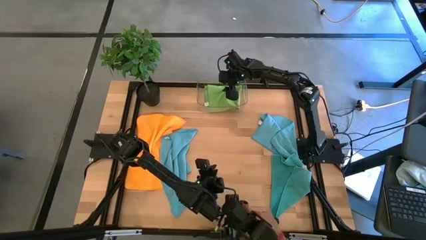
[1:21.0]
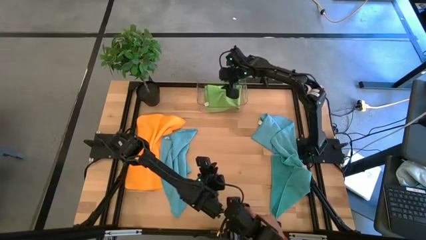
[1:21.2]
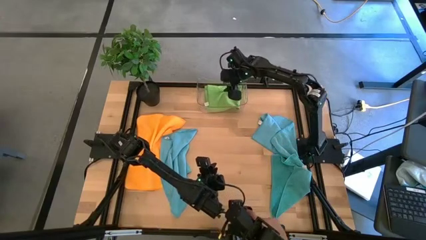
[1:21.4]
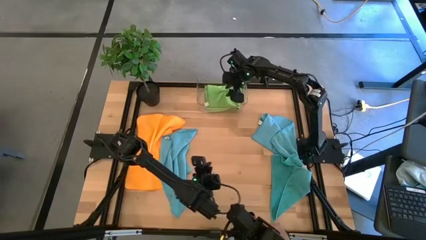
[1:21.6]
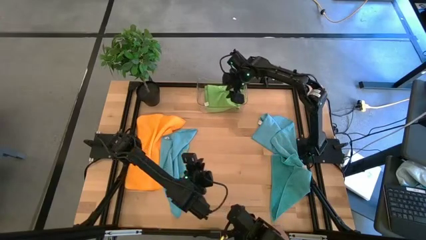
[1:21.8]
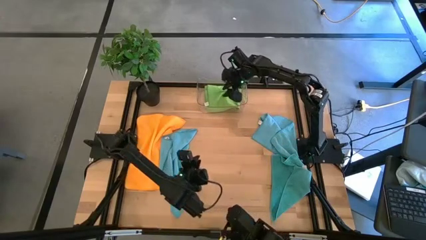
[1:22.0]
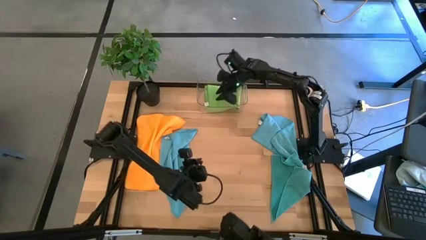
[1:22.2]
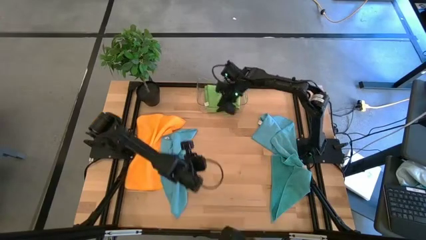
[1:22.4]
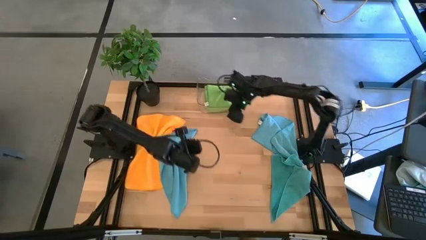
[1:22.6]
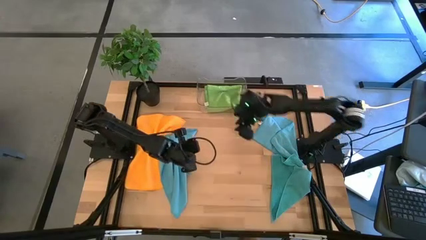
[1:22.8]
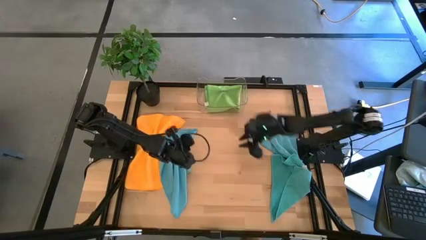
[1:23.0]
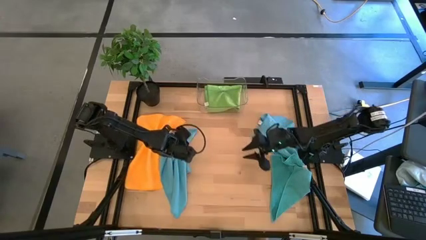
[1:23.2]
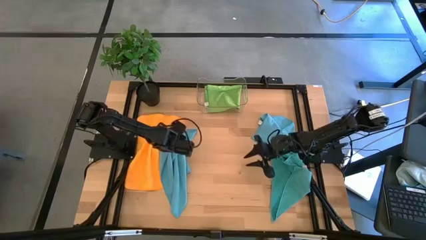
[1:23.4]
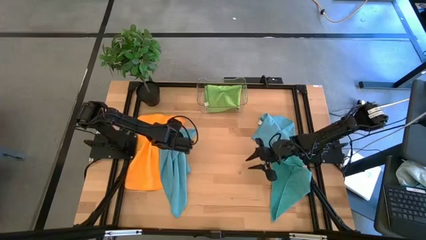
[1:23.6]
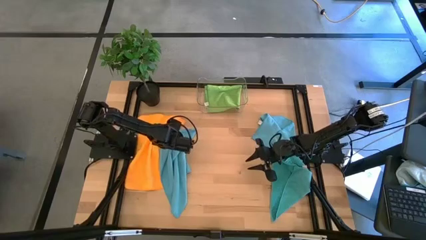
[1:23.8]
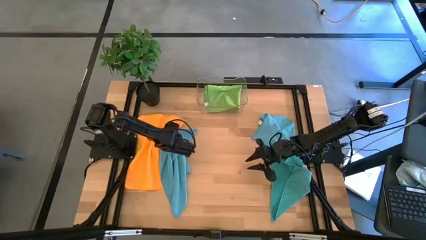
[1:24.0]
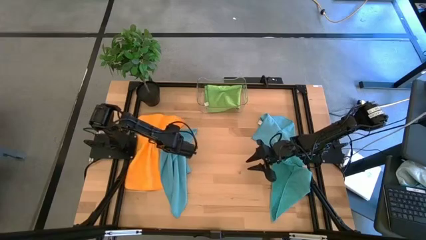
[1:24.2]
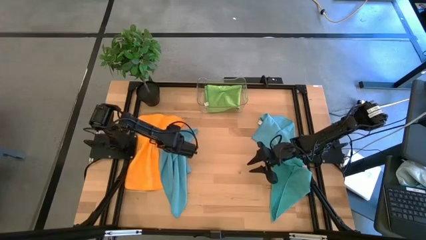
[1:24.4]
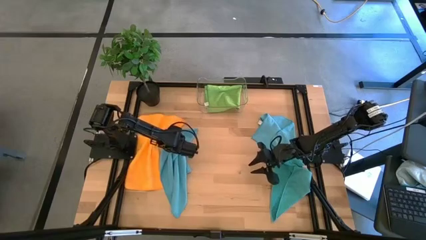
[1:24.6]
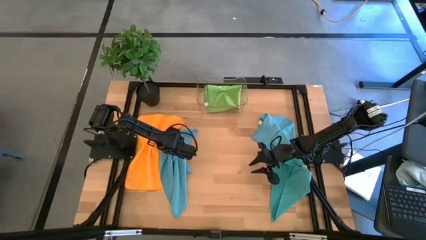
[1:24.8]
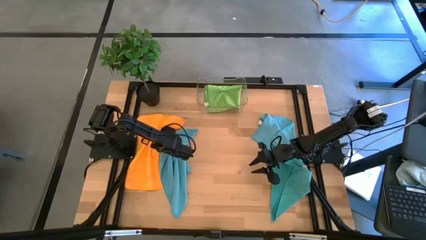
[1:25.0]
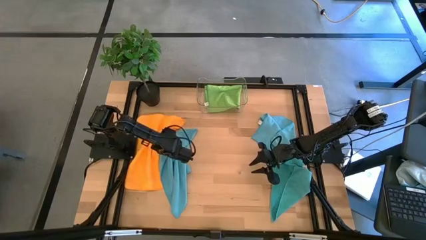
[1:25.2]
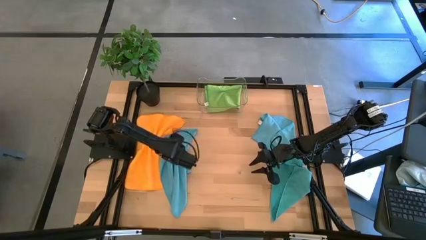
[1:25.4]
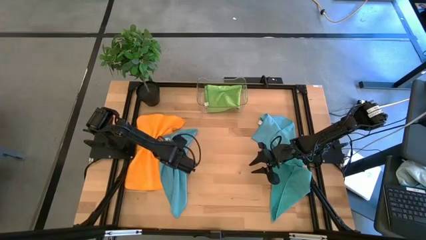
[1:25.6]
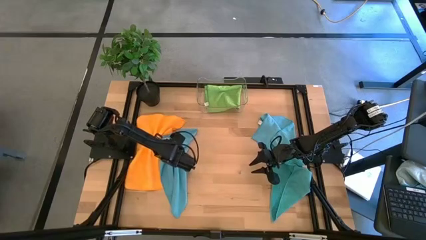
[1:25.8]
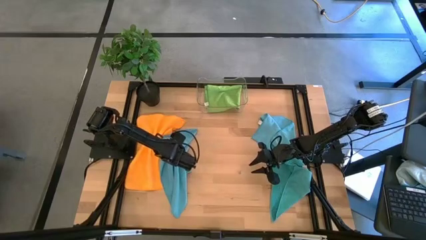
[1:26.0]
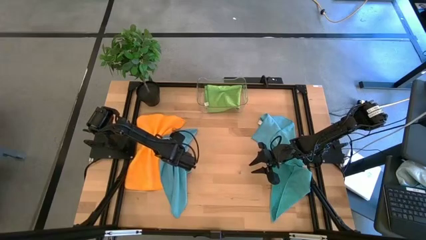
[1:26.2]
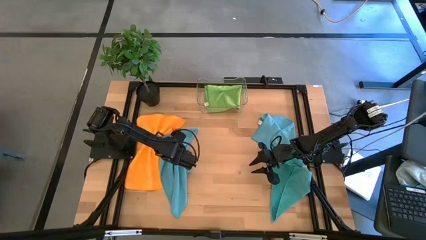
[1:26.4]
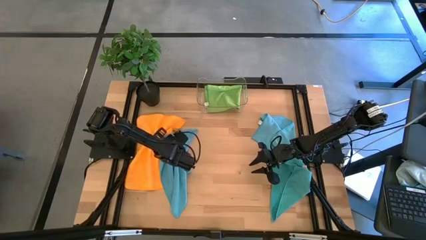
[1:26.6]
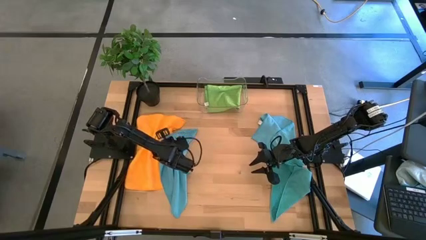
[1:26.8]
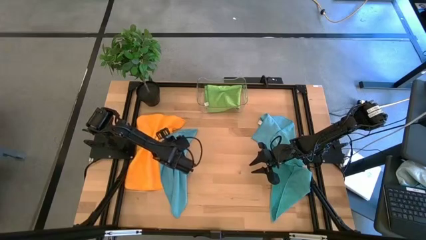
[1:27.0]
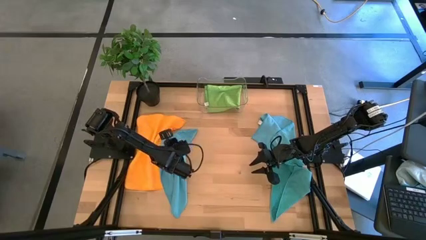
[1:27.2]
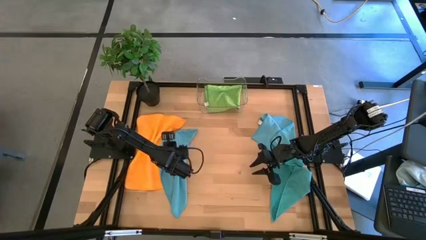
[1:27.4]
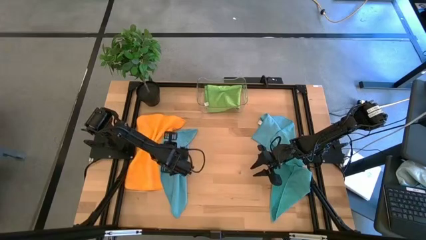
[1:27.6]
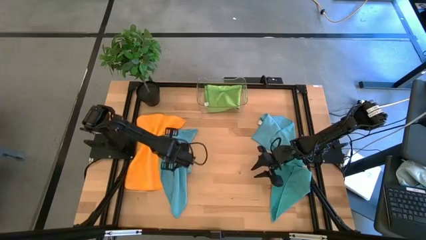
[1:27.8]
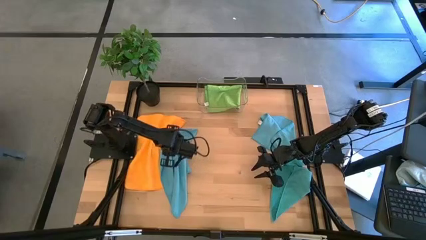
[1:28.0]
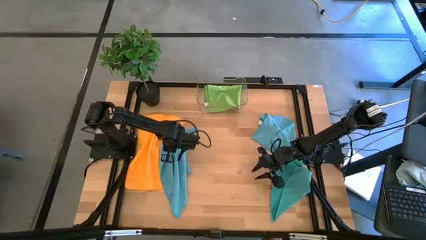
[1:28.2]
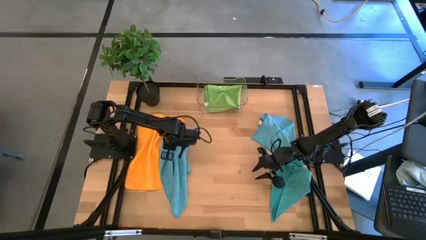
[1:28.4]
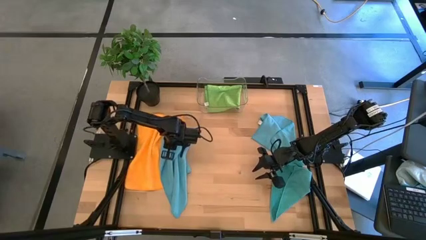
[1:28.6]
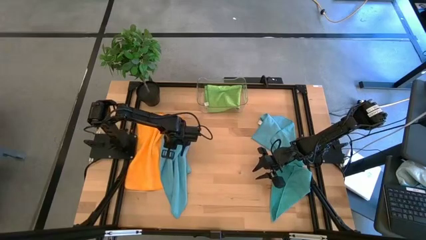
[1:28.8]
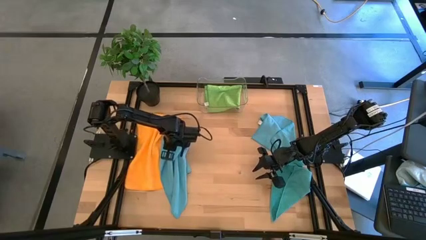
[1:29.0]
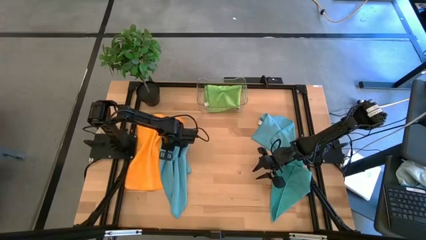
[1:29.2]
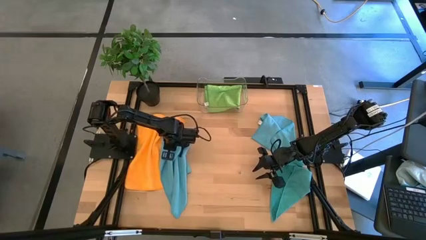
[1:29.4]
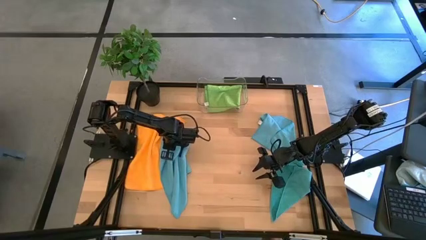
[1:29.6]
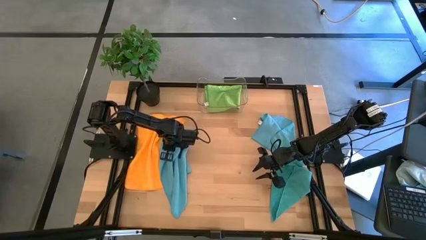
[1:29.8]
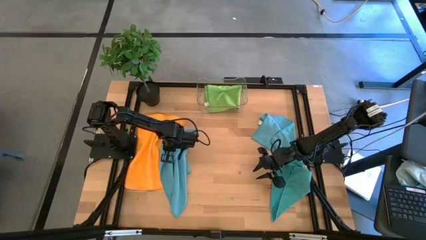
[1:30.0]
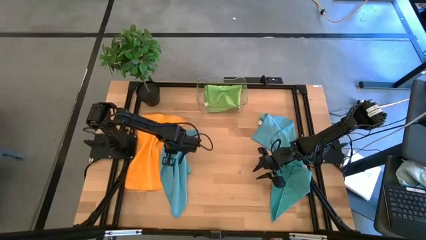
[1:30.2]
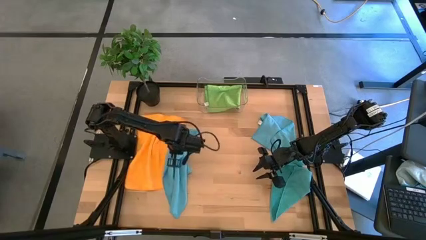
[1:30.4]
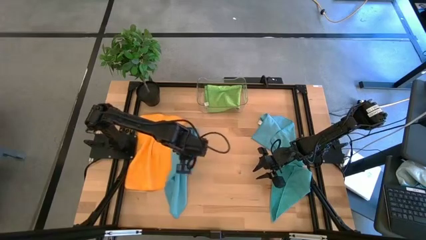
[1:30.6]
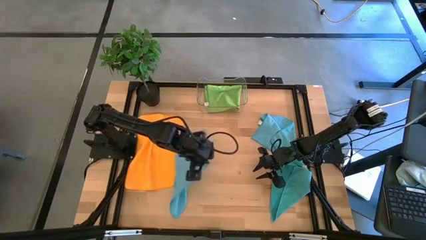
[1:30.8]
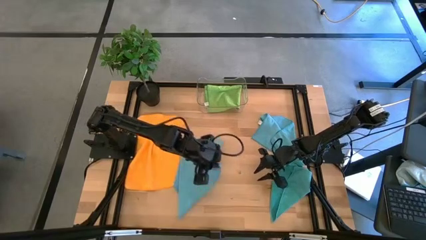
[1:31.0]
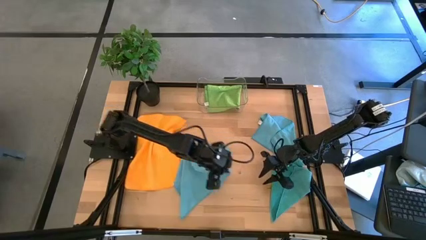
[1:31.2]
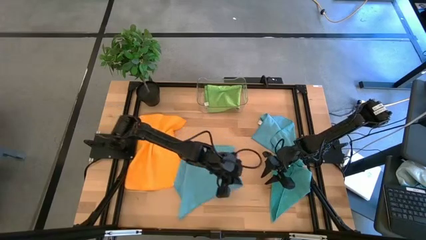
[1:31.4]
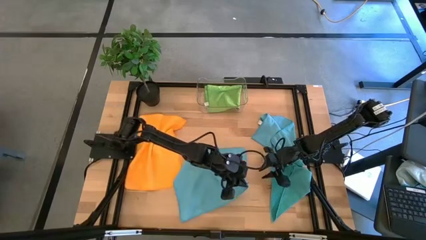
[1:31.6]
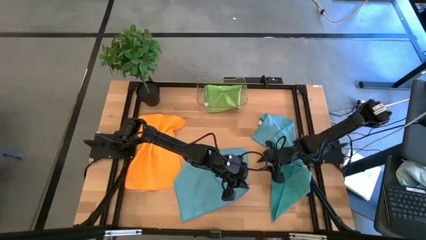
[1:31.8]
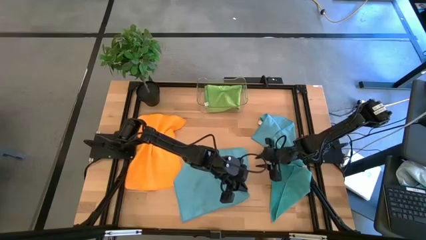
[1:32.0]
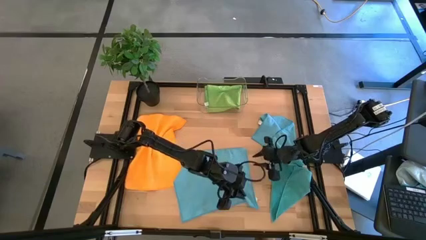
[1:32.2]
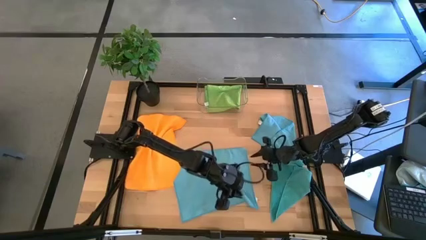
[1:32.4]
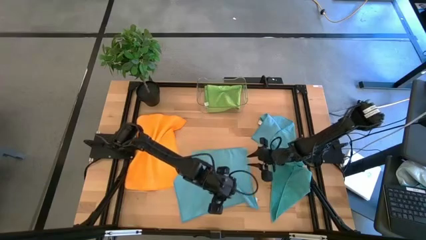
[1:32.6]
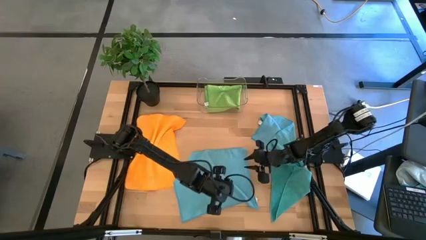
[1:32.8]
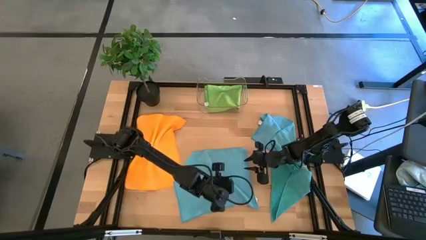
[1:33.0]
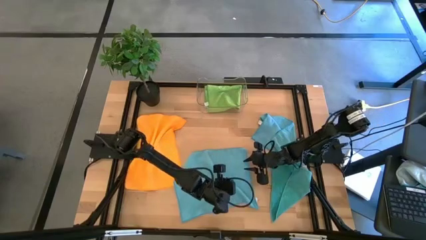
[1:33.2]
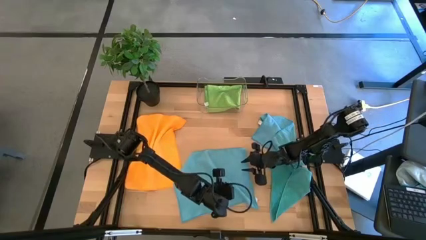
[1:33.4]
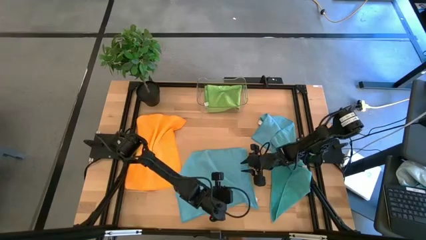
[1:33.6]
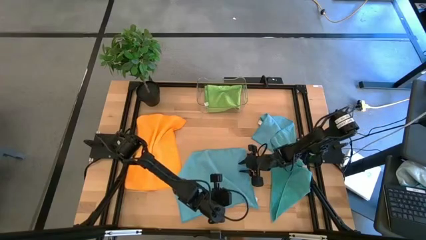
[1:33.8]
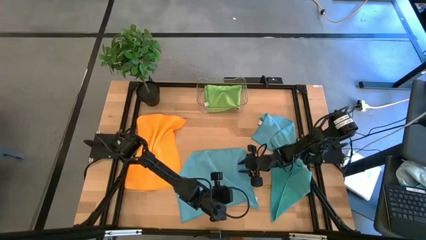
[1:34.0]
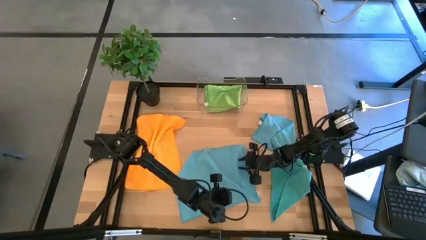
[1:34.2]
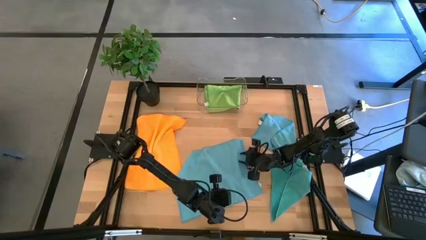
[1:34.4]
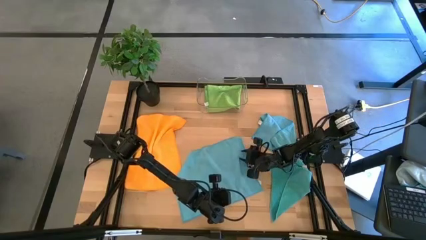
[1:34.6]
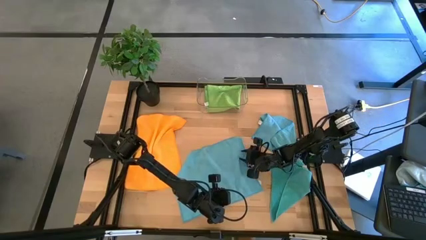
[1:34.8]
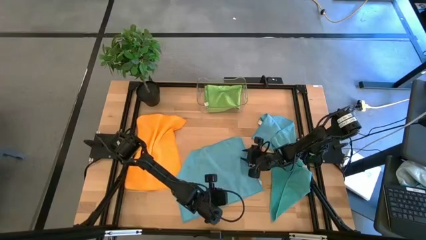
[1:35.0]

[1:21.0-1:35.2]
Task: Fold microfiber towels
Fold the top left blue microfiber towel
